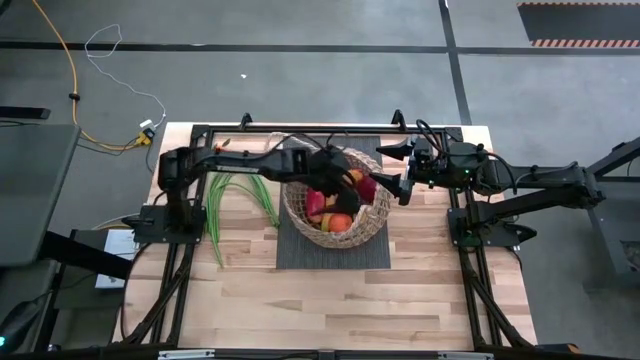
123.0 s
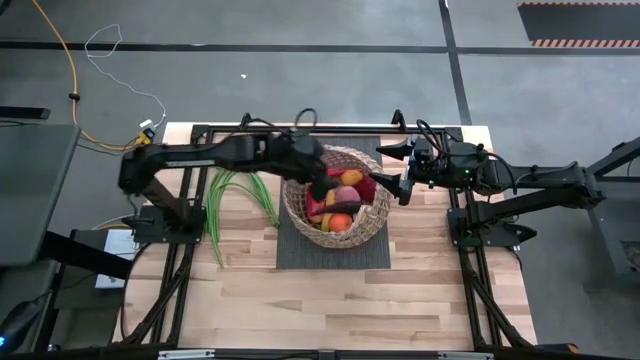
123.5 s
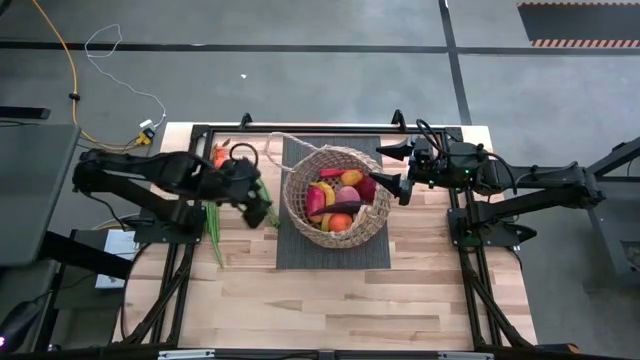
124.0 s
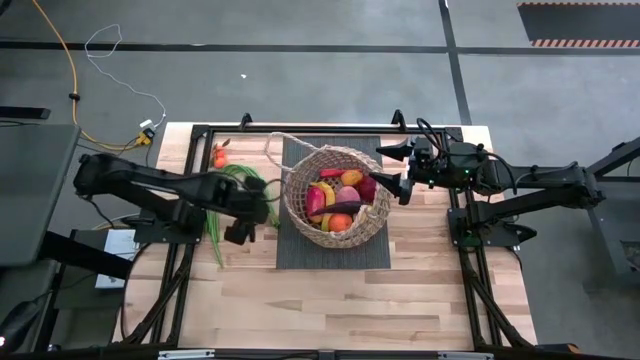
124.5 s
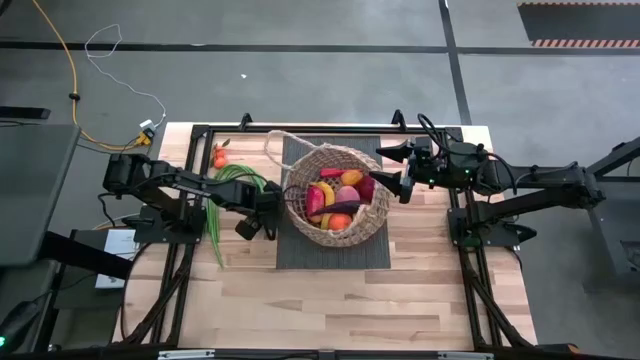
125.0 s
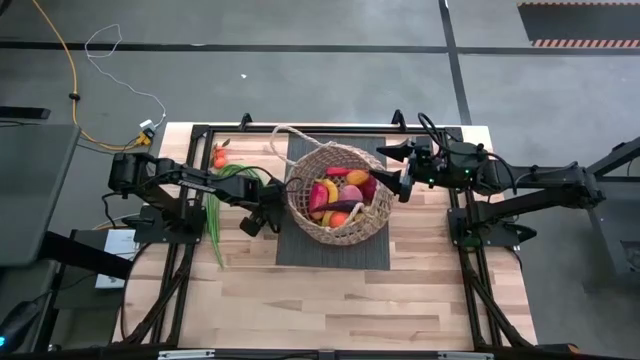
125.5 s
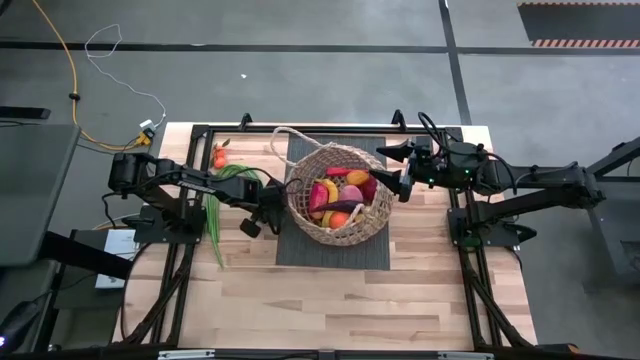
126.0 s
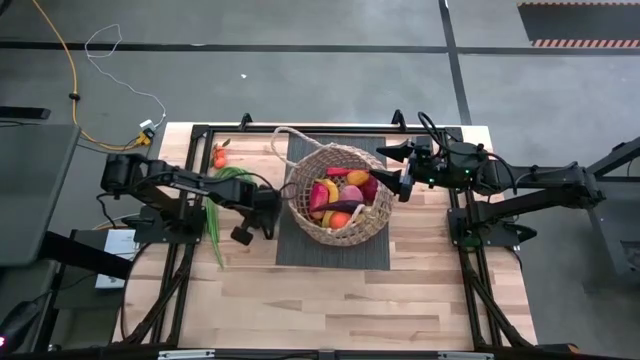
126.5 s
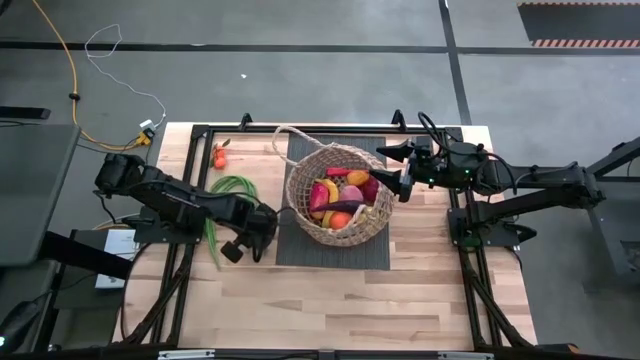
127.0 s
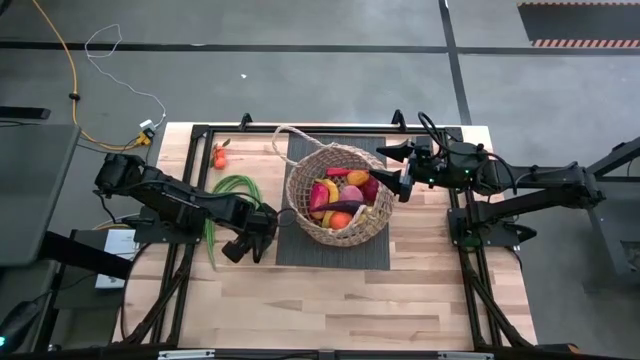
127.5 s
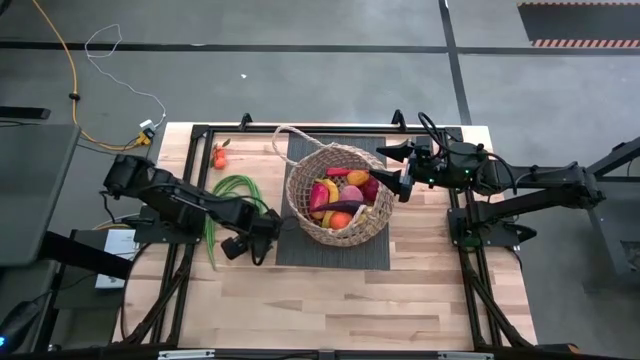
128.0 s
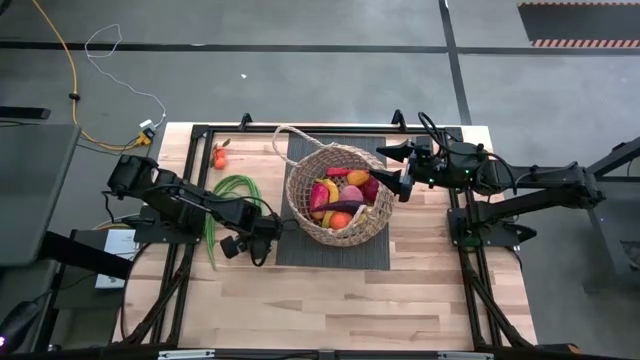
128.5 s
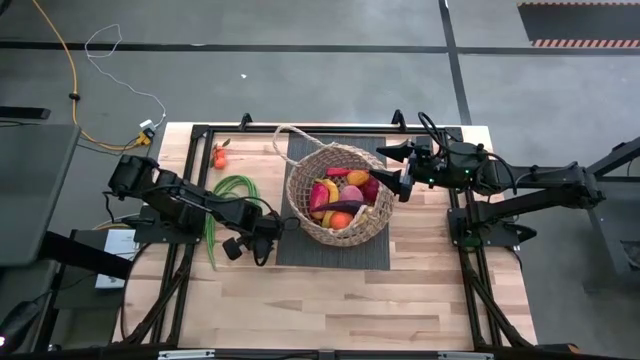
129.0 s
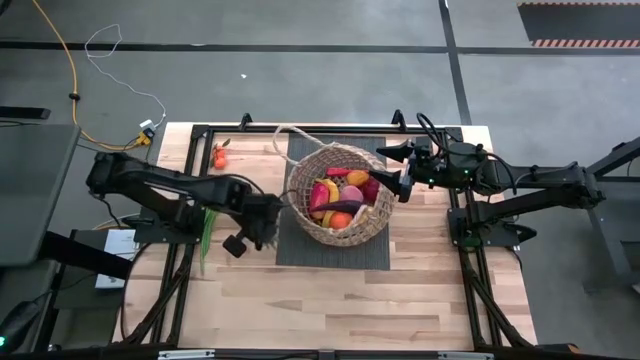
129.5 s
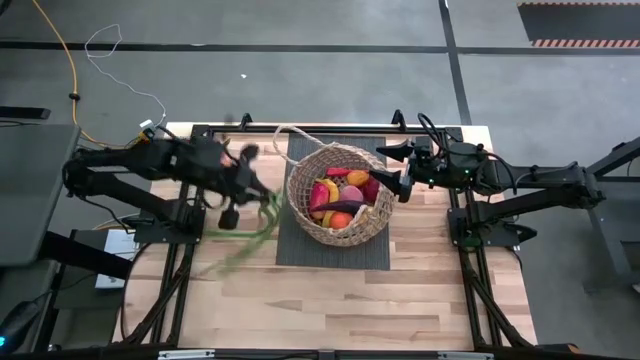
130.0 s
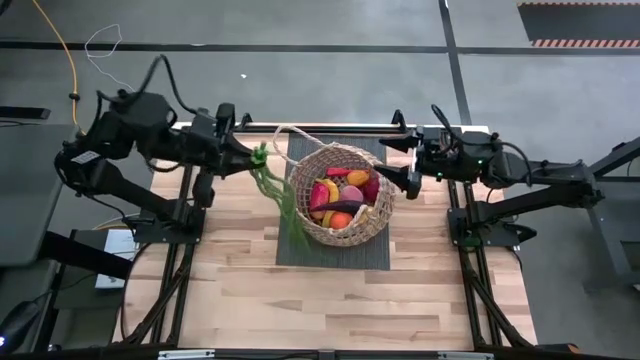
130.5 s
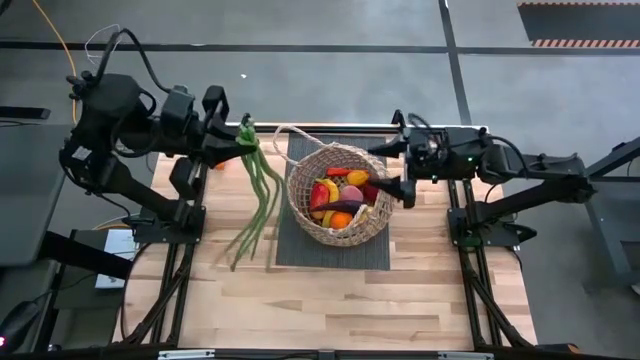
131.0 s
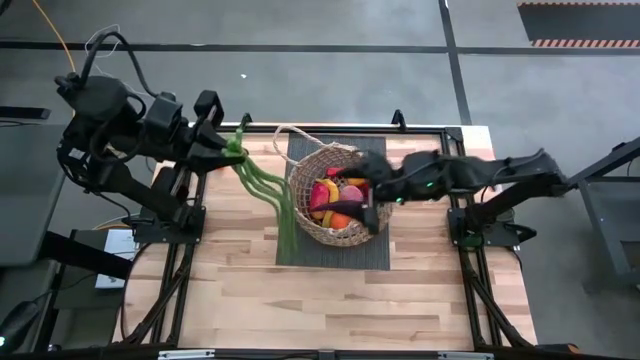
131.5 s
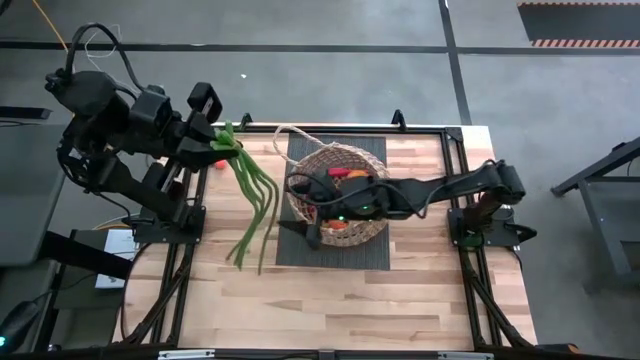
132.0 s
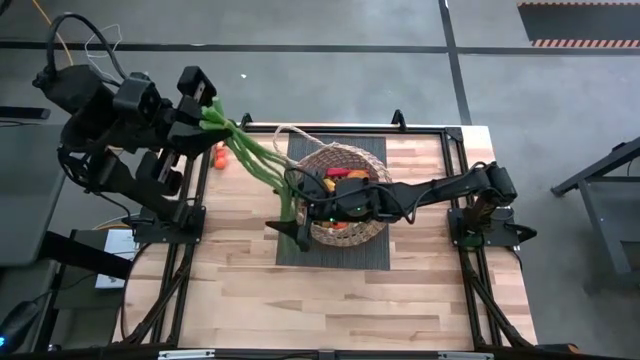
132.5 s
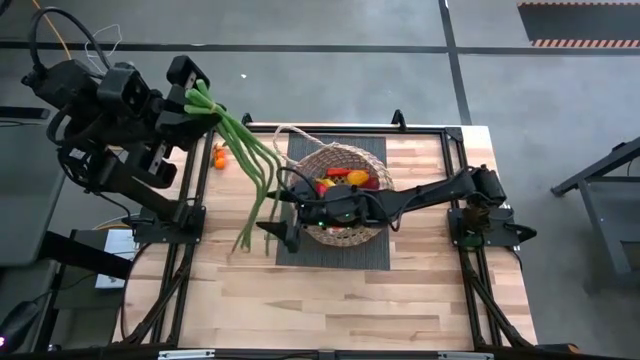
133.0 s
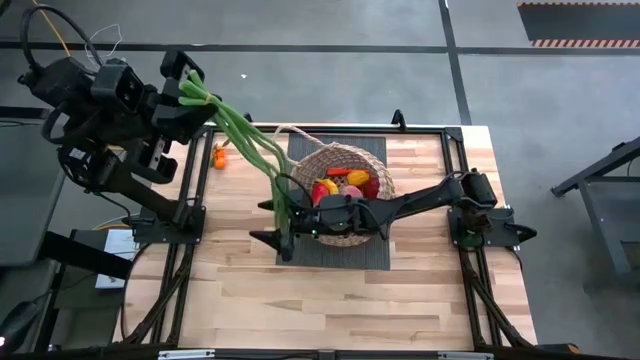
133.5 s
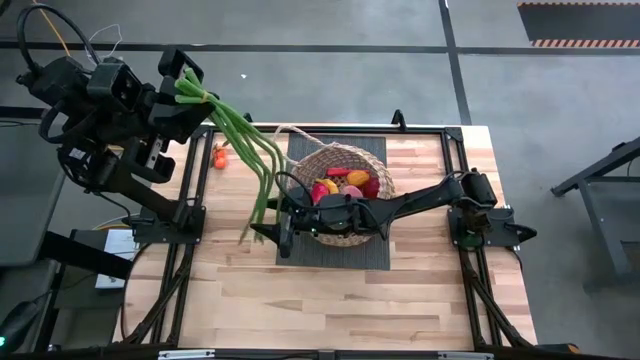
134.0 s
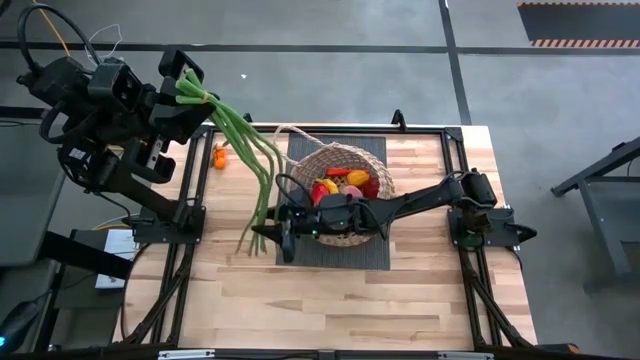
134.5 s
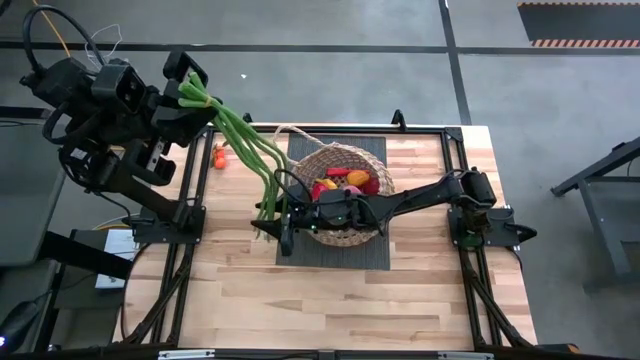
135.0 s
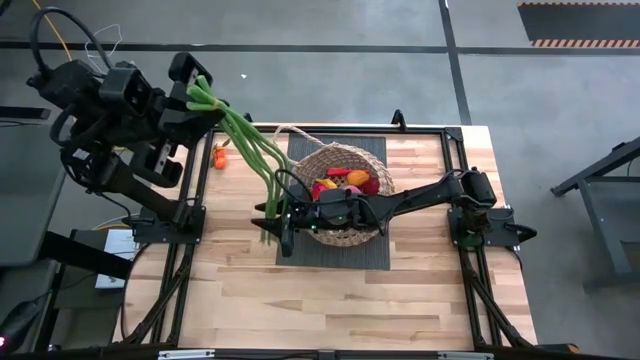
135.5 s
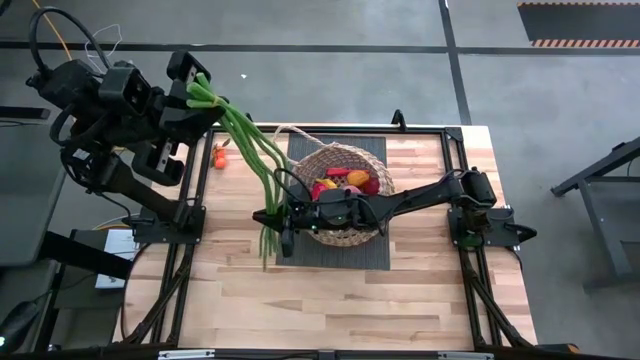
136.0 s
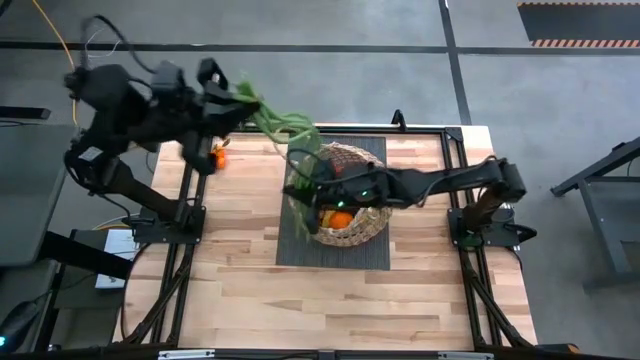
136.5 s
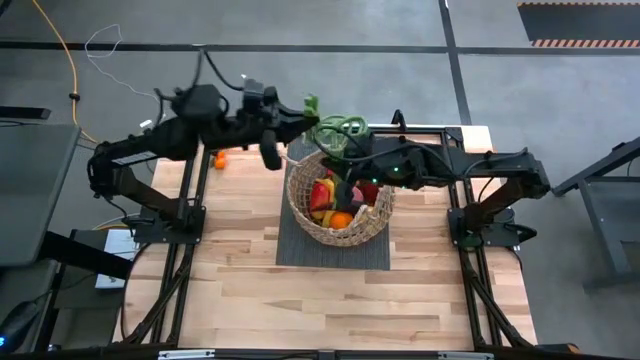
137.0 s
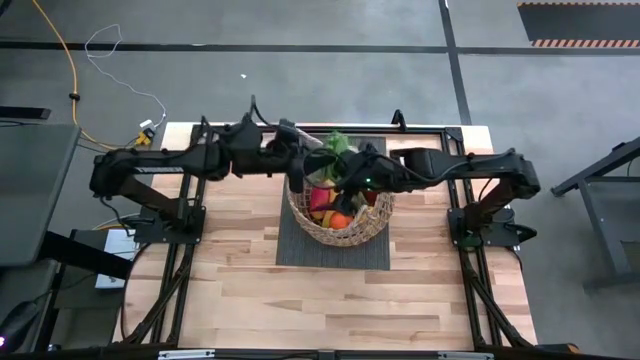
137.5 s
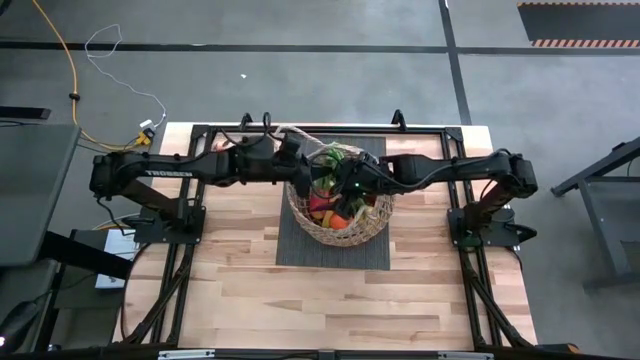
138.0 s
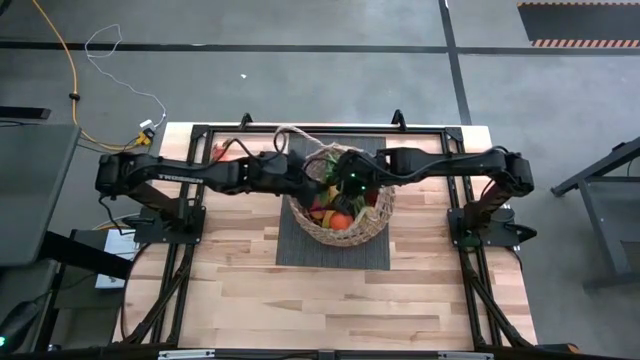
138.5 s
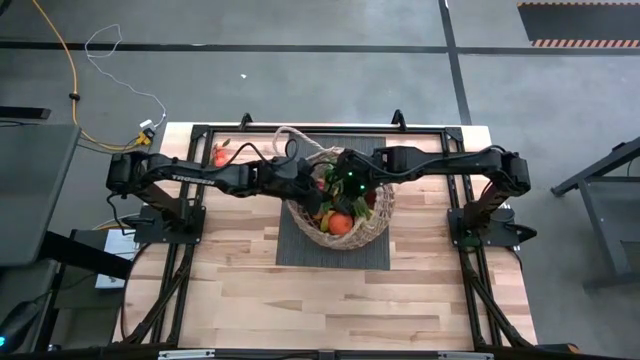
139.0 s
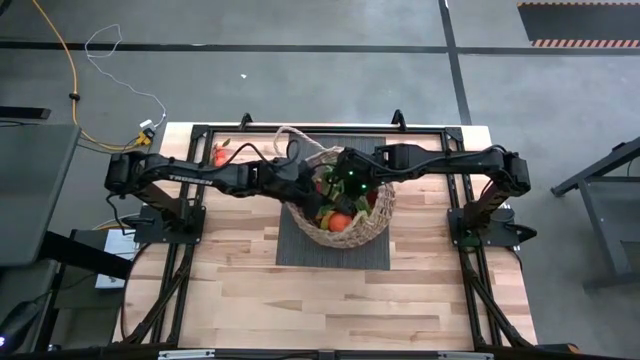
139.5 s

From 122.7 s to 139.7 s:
Task: Build produce basket
Put the string beans into the woven basket

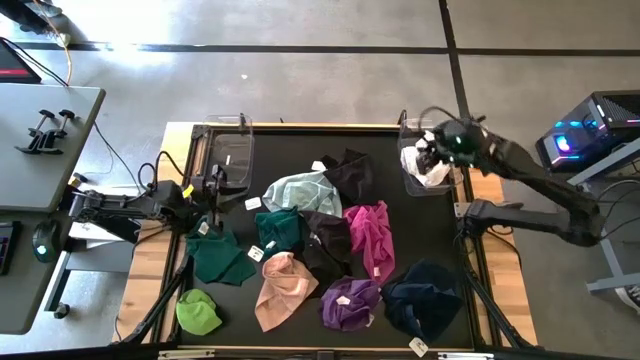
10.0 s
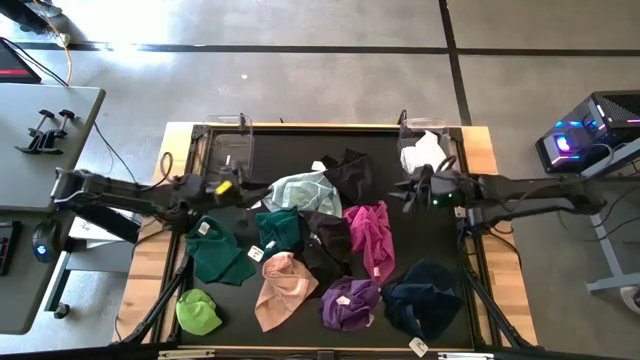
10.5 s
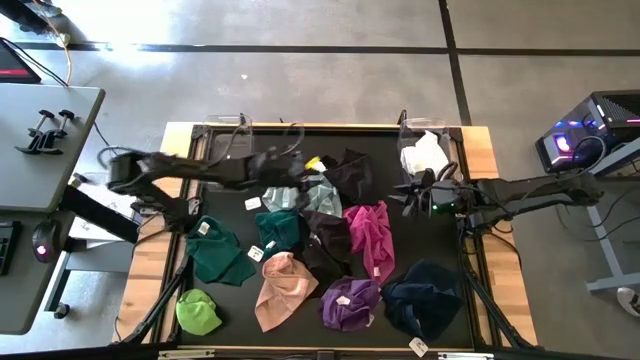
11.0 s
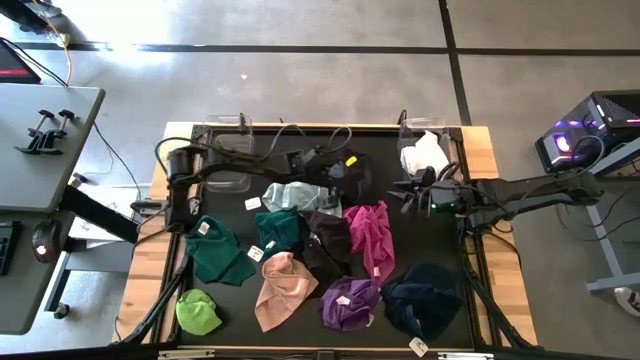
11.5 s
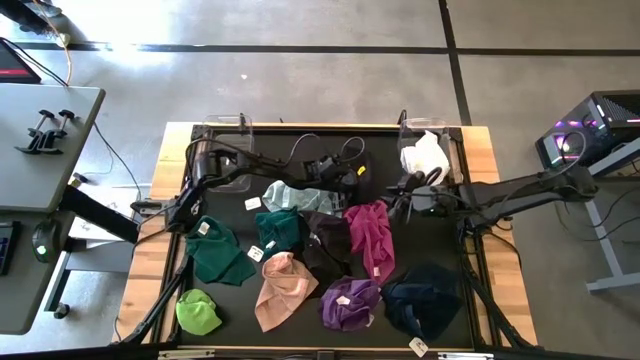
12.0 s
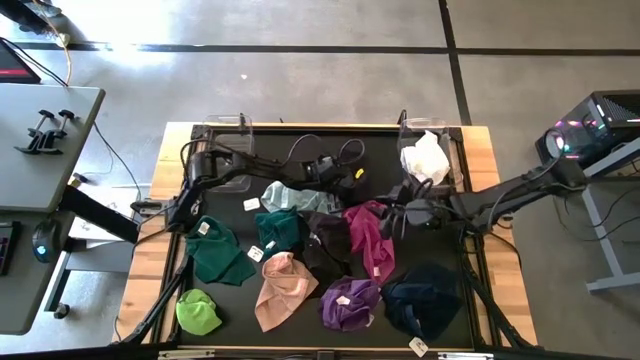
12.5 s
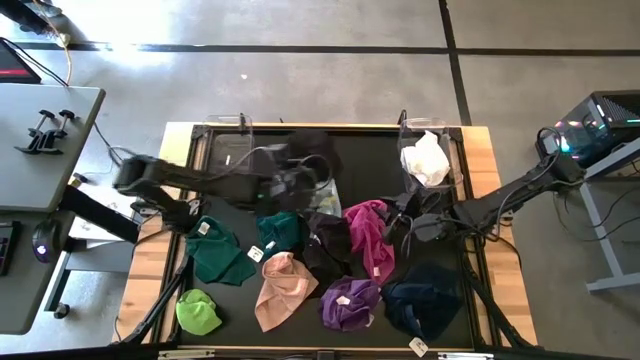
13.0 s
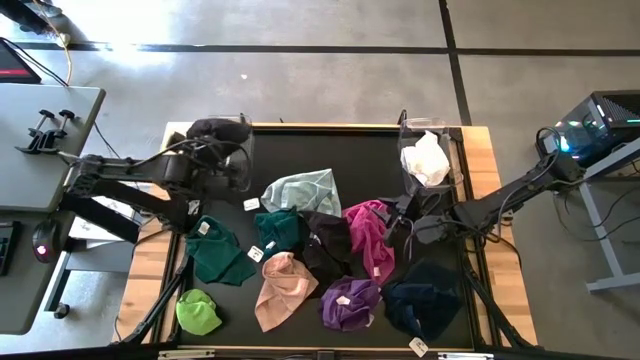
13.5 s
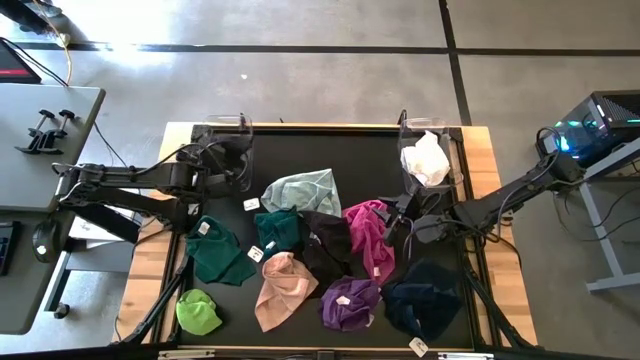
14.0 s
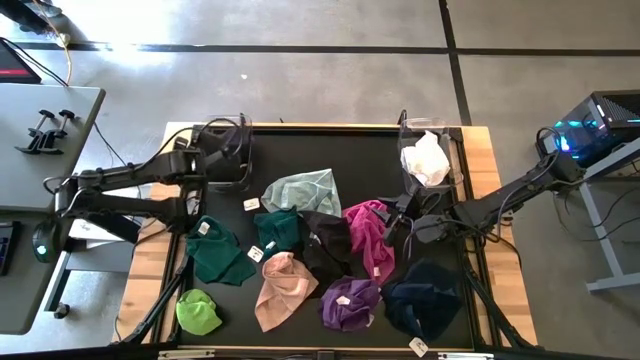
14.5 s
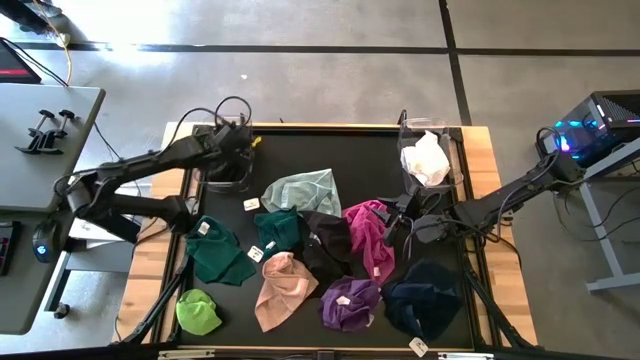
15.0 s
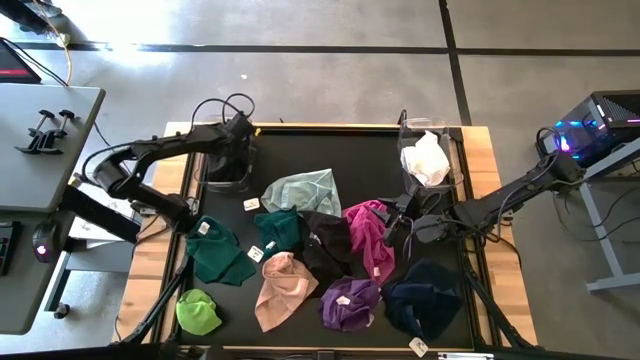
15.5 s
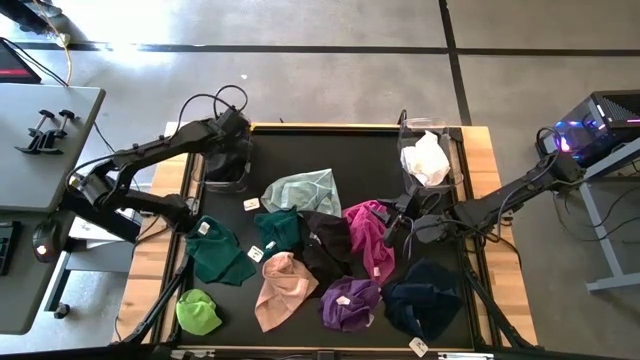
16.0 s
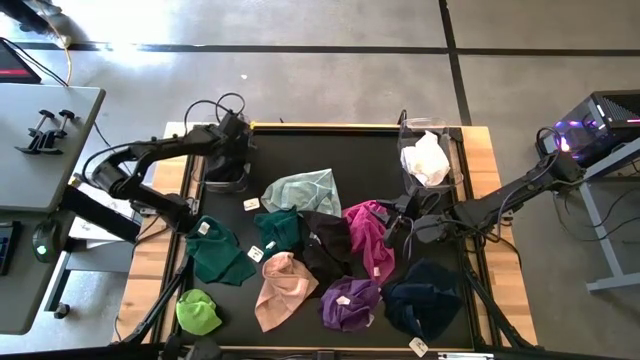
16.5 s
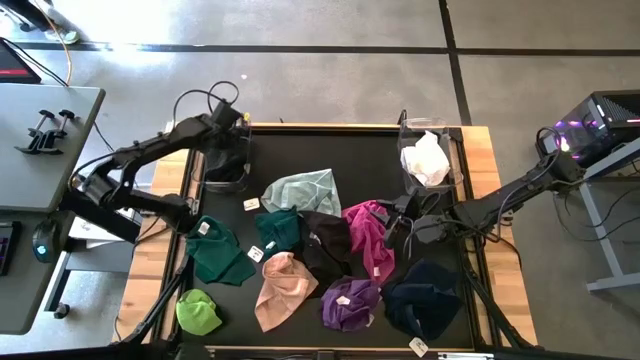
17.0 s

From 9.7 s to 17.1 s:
Task: Sort towels by color in basket
Put the top black microfiber cloth into the left transparent bin
